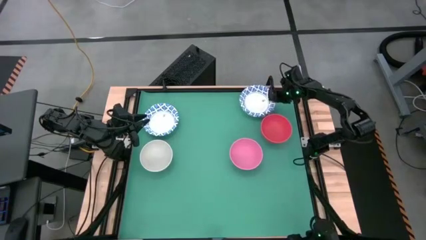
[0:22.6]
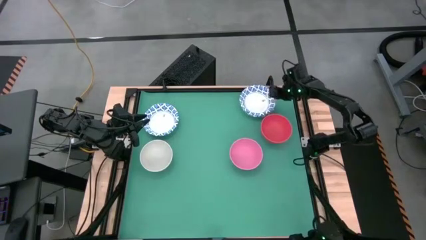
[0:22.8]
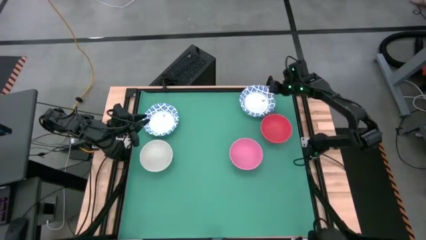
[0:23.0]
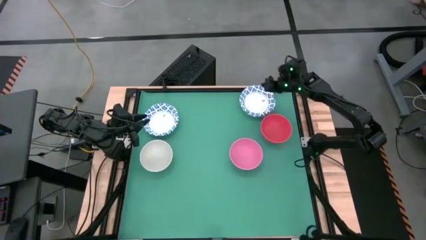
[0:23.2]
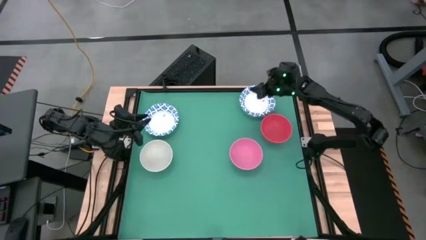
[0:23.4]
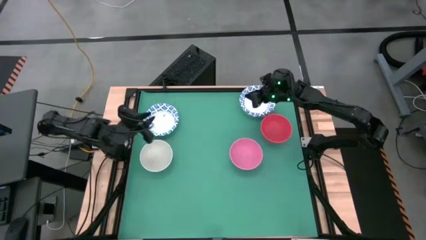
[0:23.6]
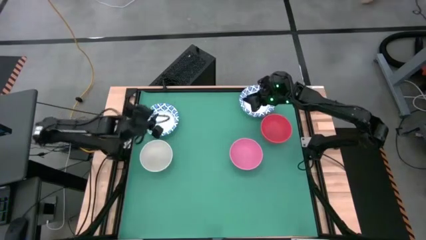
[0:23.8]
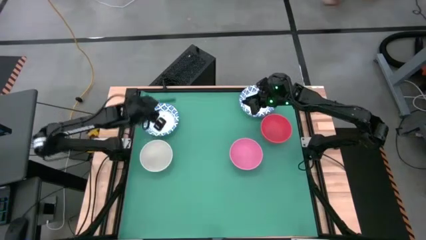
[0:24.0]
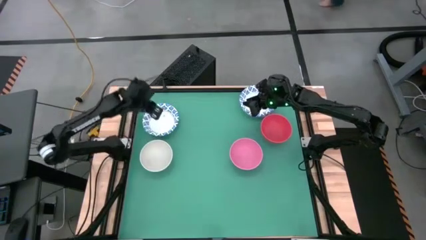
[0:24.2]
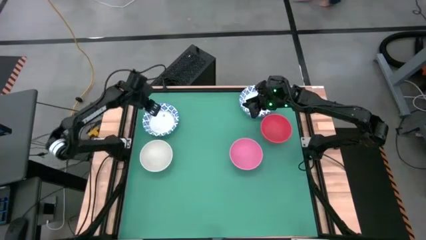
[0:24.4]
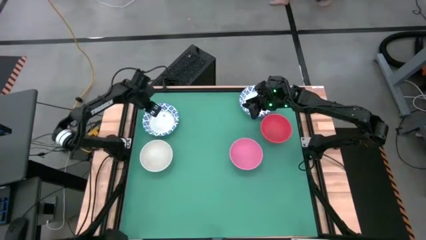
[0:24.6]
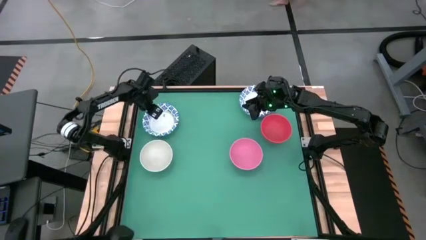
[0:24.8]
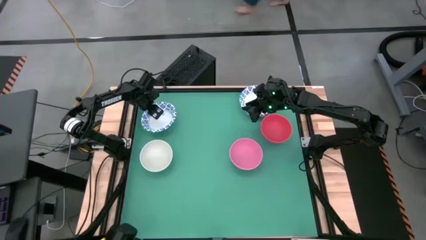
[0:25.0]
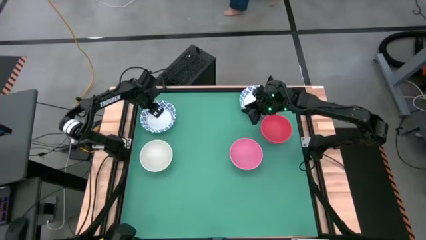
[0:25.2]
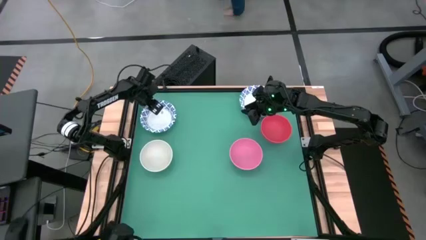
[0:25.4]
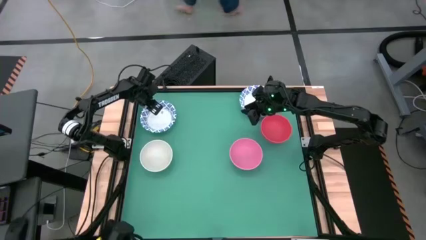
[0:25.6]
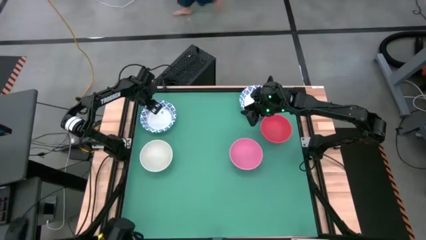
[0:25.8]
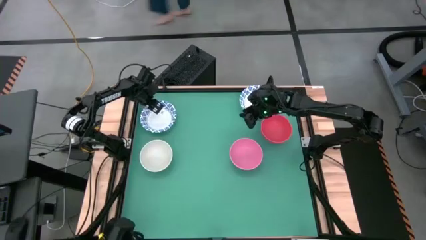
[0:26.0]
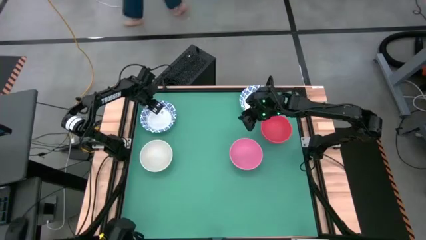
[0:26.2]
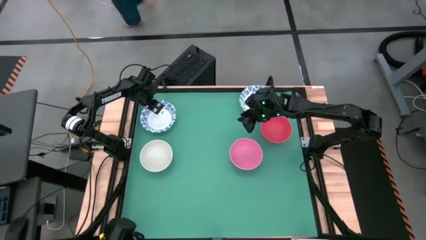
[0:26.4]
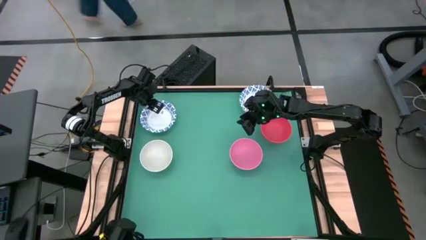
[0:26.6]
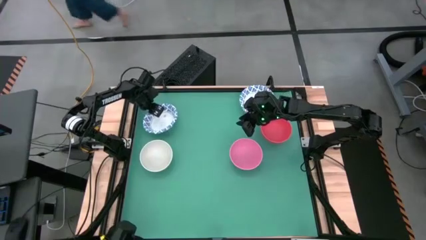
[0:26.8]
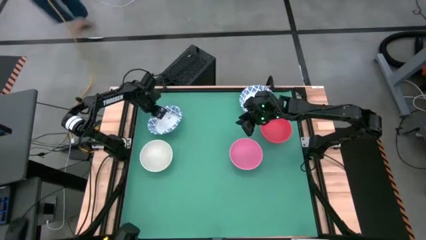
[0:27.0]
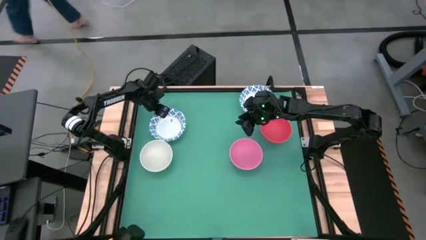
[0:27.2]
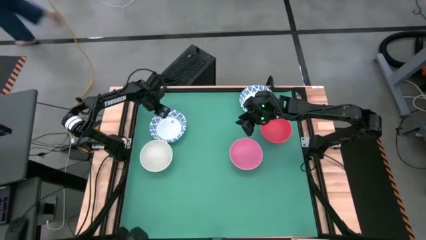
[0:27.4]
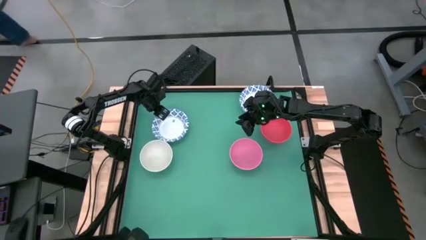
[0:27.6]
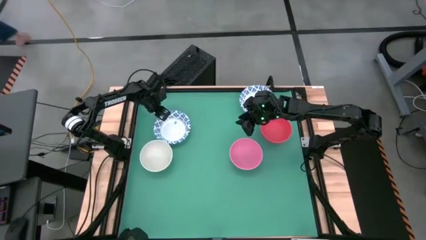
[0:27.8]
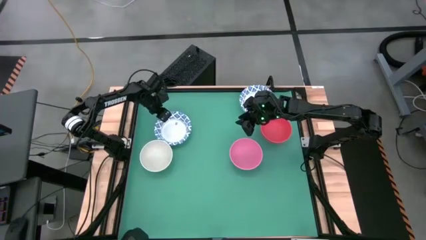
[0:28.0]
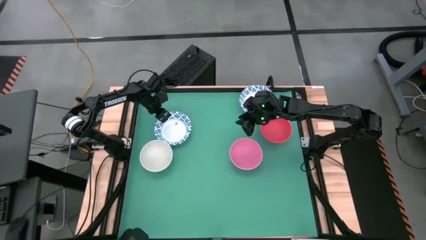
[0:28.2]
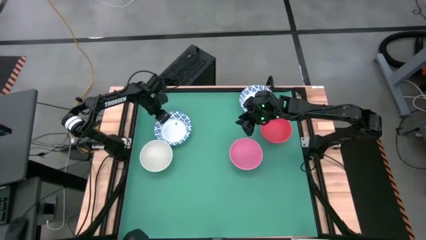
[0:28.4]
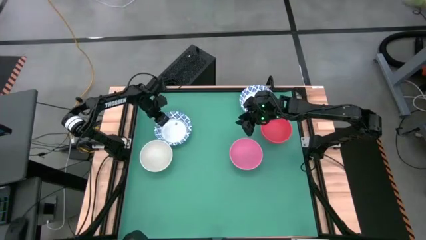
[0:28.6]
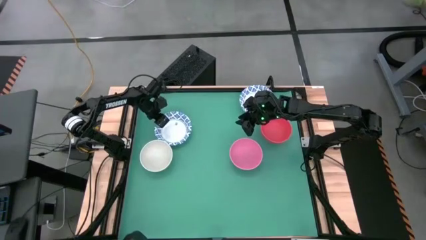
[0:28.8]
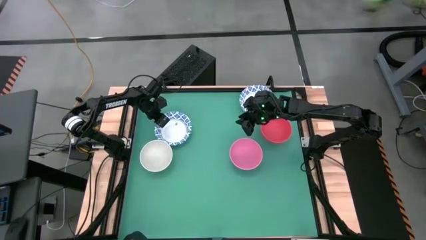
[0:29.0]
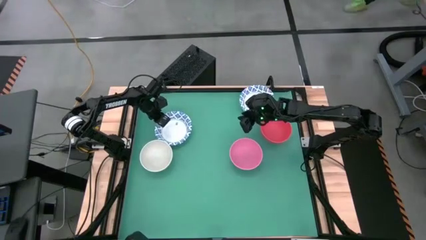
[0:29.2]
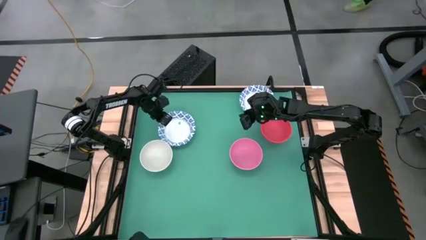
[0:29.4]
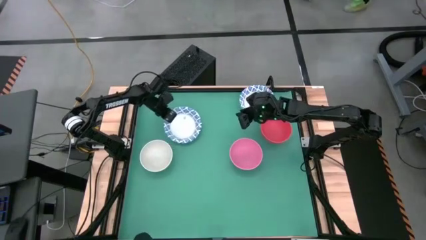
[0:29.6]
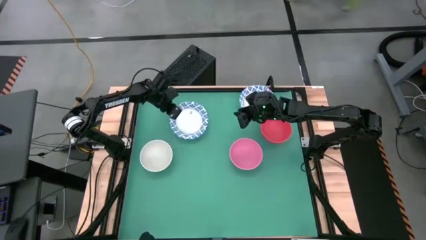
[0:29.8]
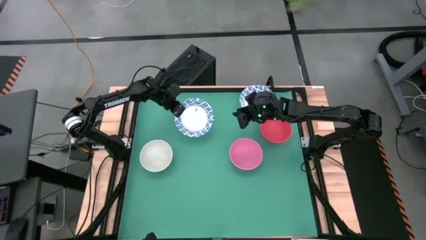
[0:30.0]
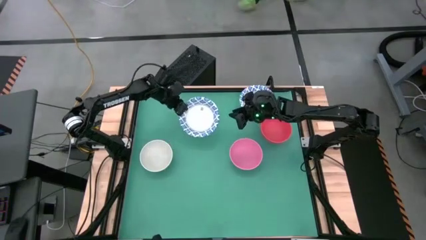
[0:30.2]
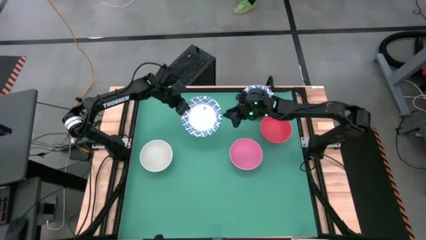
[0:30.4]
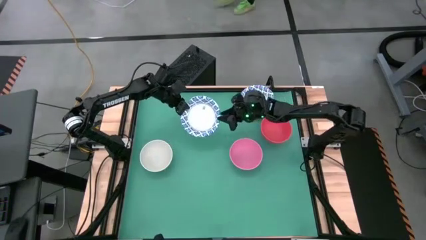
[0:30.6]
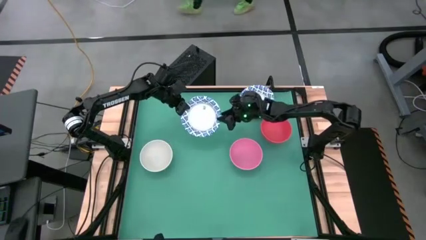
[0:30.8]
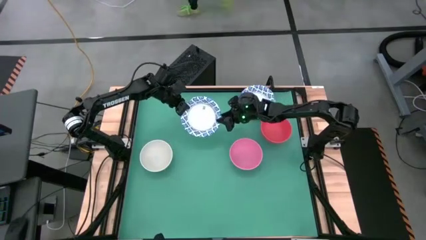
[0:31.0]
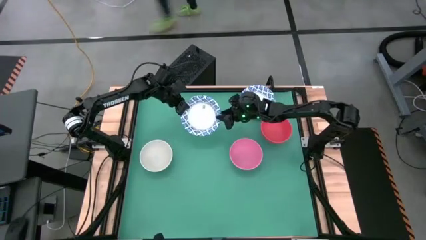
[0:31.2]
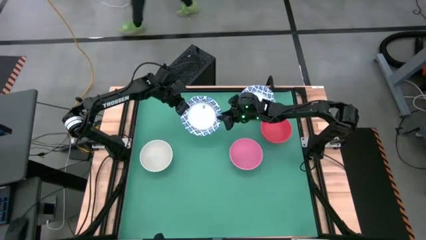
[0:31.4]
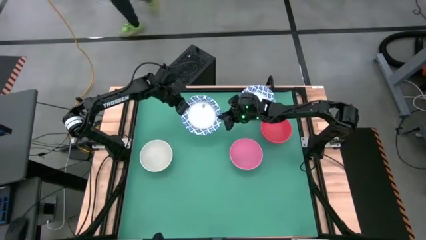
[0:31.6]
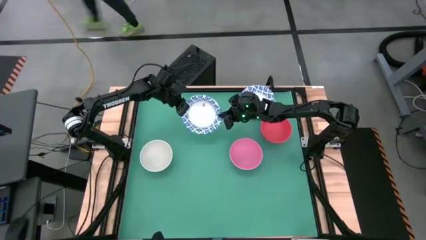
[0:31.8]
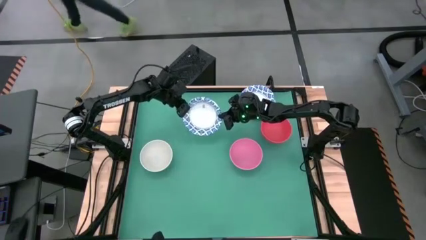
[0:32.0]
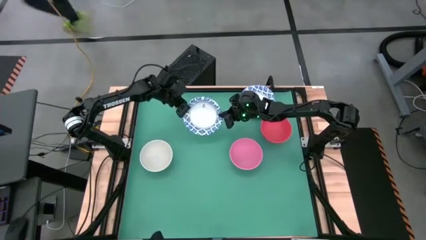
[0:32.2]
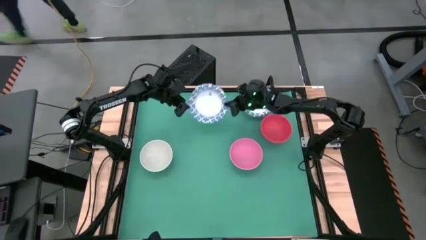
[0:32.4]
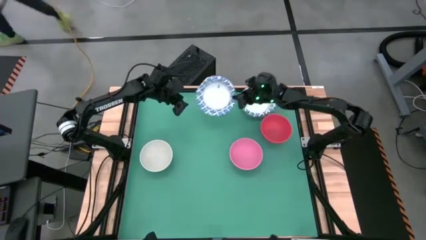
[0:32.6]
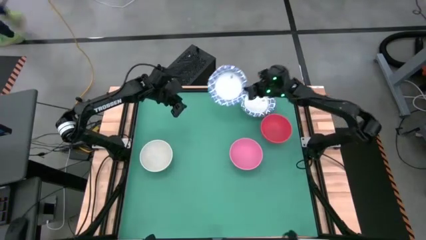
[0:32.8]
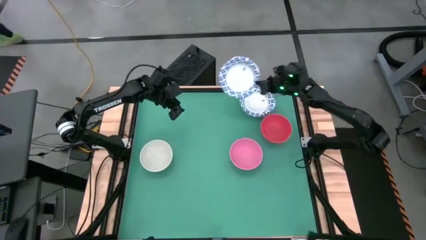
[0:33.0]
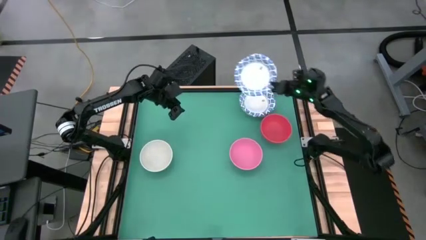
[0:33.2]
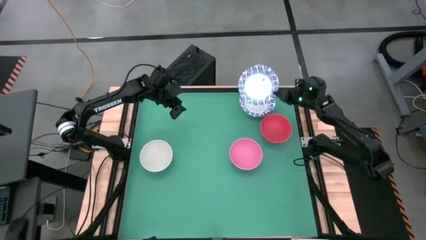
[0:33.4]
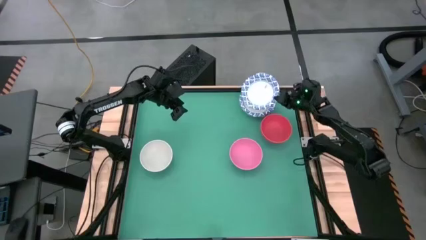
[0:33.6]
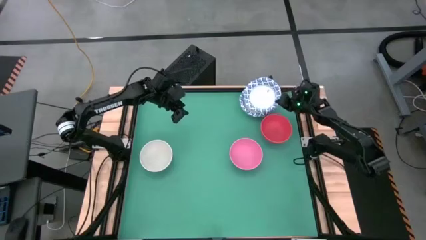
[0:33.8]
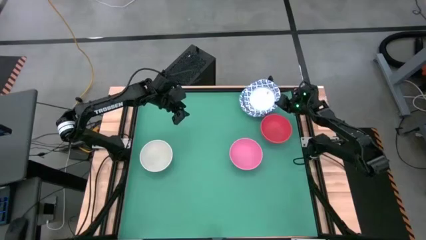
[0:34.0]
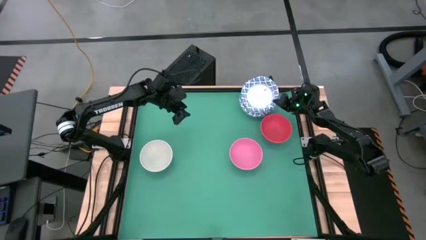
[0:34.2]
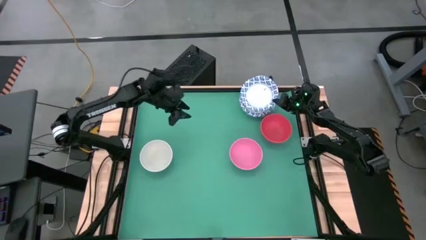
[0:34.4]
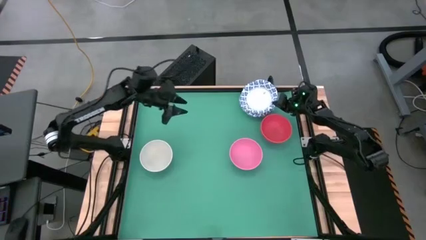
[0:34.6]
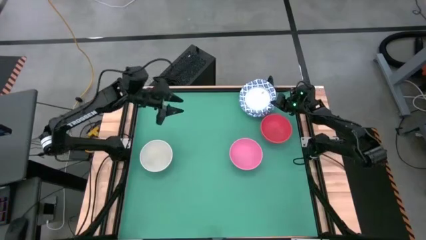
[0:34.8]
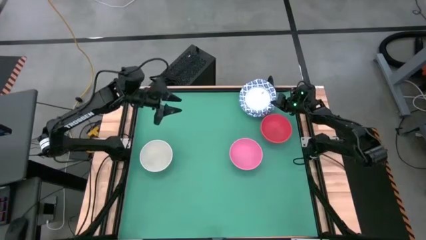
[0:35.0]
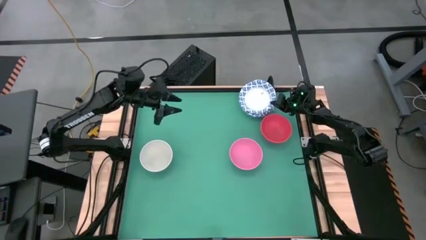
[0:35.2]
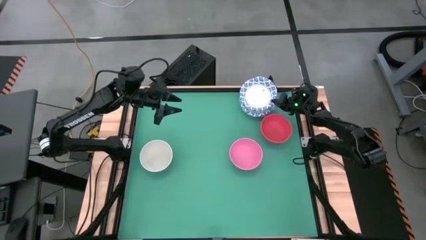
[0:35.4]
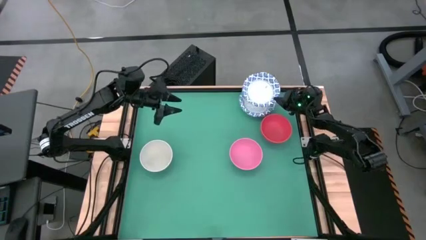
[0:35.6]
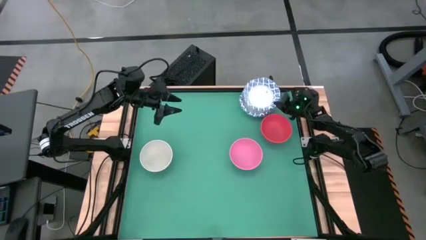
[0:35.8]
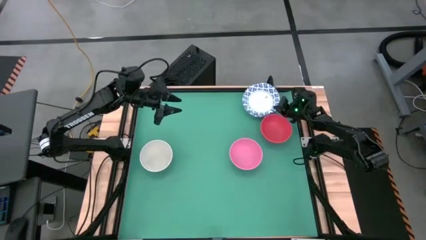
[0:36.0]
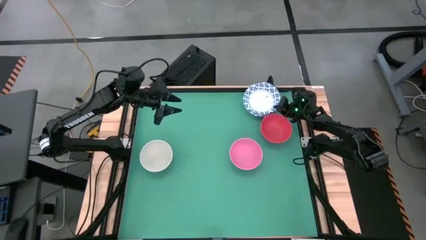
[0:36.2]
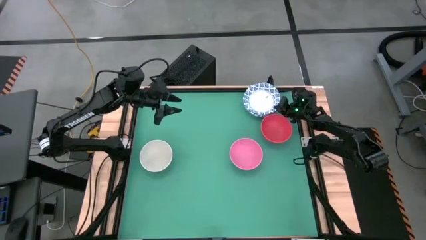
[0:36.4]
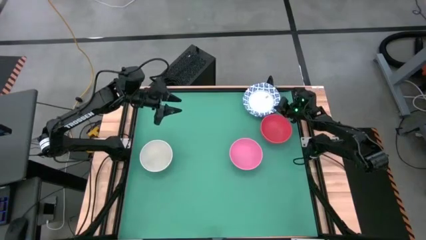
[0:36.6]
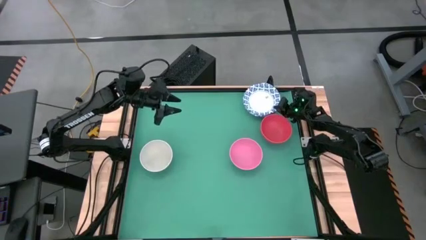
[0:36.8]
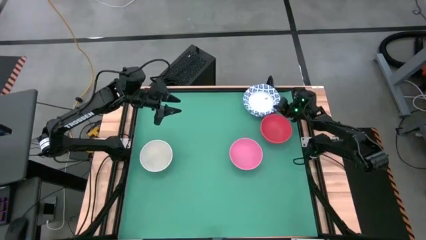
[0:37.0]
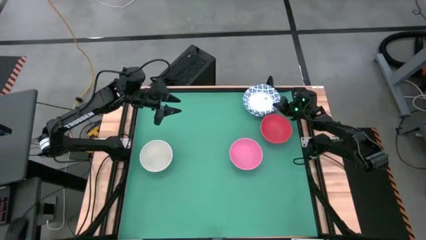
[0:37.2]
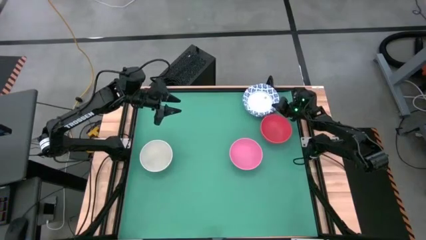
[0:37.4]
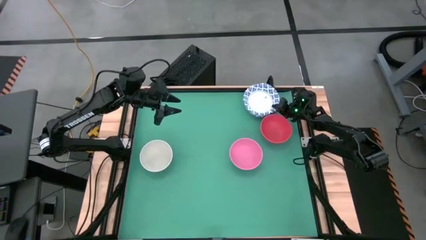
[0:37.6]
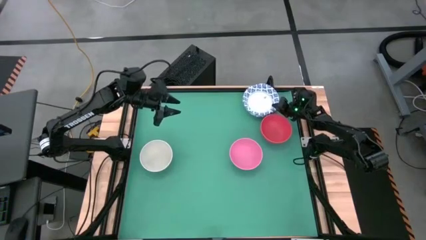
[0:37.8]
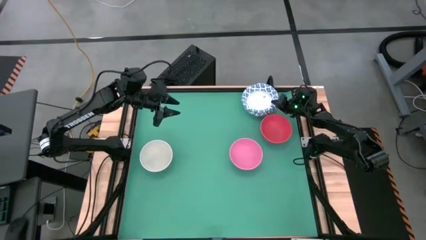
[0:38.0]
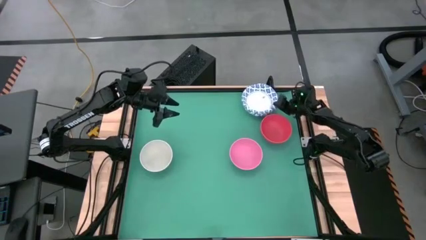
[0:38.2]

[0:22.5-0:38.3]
Task: Nest bowls inside each other by size order
Stack the white patterned bowl on top of the white patterned bowl
